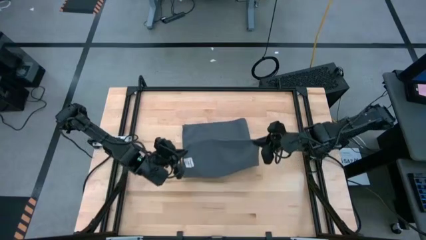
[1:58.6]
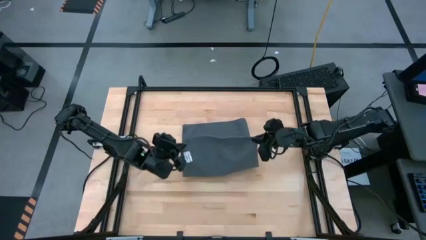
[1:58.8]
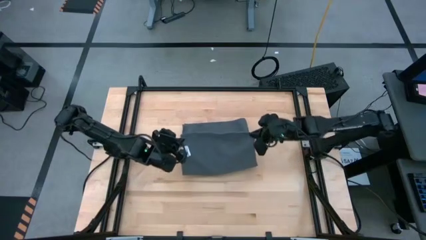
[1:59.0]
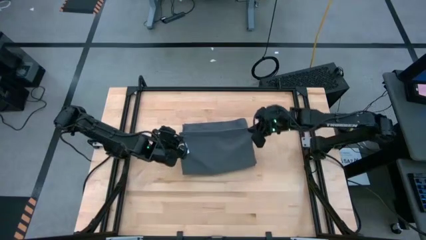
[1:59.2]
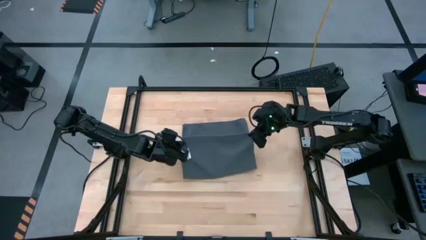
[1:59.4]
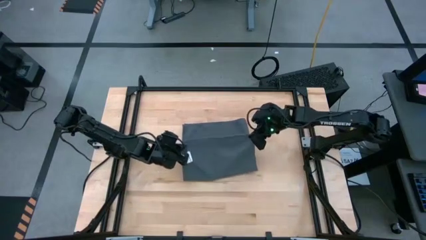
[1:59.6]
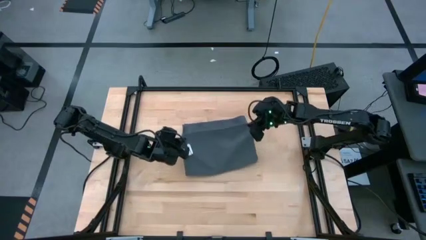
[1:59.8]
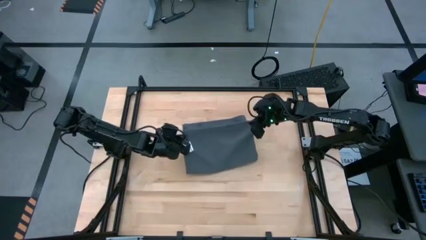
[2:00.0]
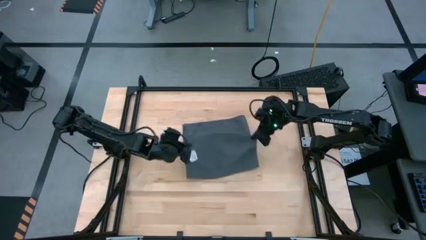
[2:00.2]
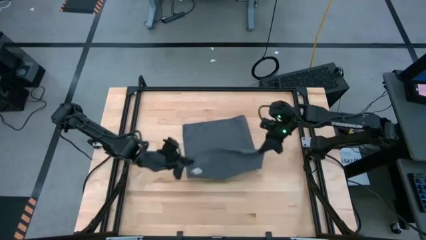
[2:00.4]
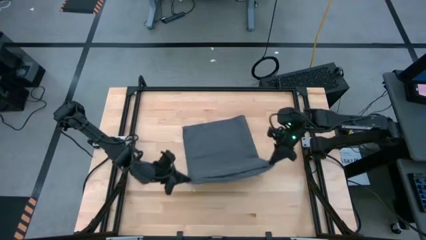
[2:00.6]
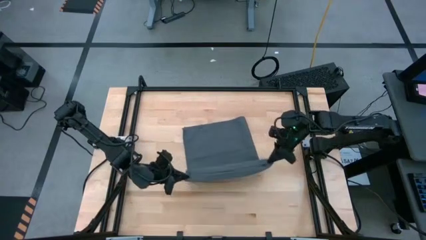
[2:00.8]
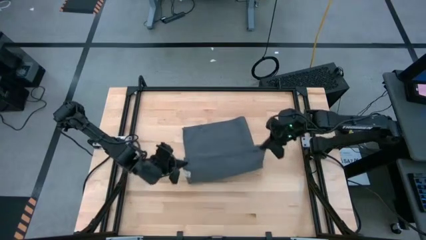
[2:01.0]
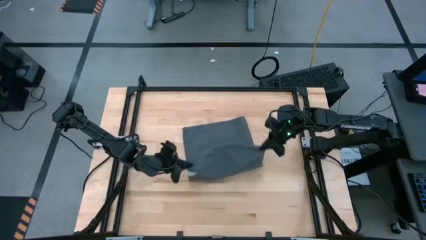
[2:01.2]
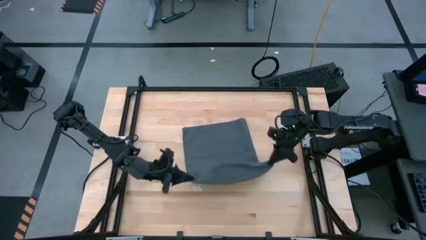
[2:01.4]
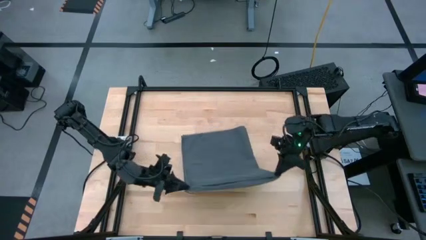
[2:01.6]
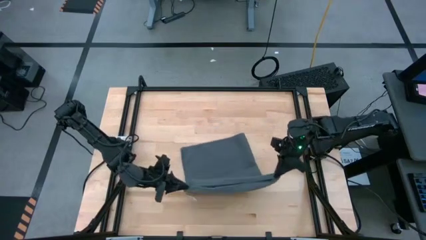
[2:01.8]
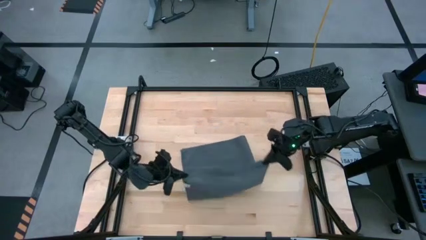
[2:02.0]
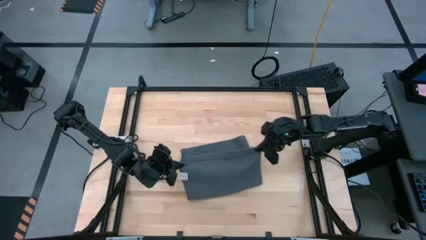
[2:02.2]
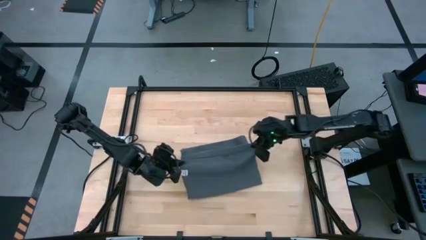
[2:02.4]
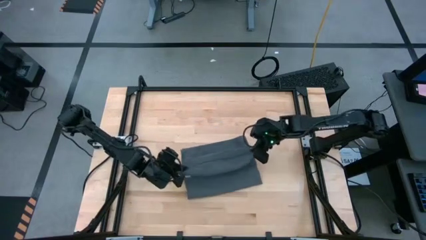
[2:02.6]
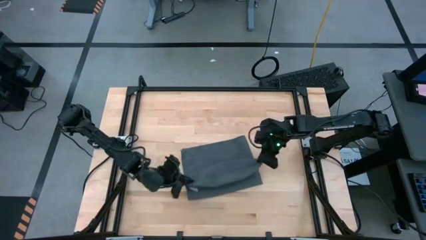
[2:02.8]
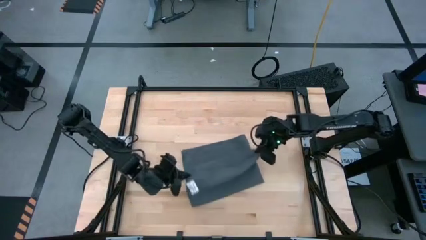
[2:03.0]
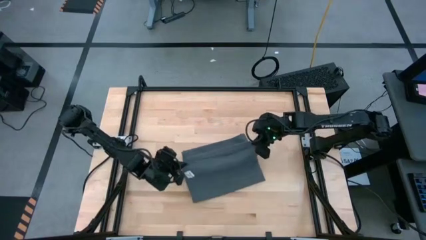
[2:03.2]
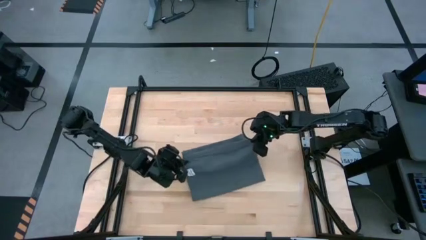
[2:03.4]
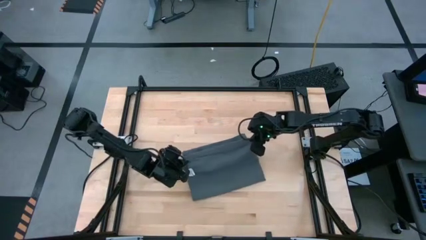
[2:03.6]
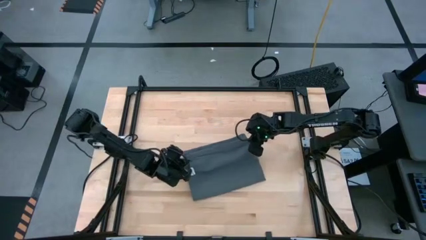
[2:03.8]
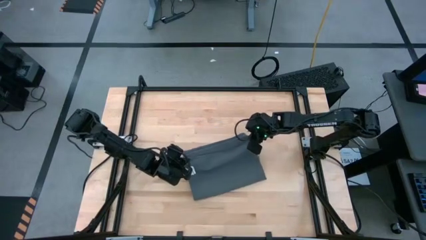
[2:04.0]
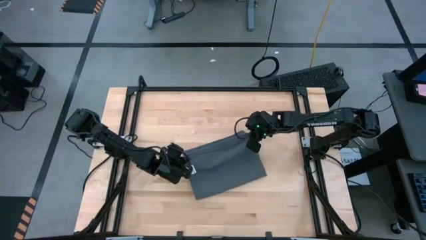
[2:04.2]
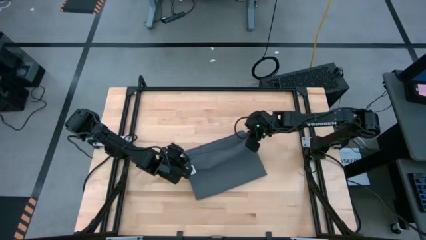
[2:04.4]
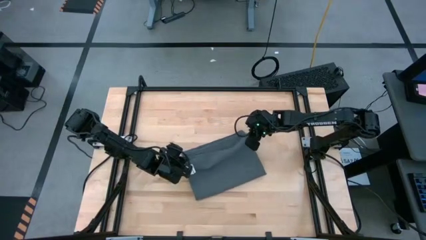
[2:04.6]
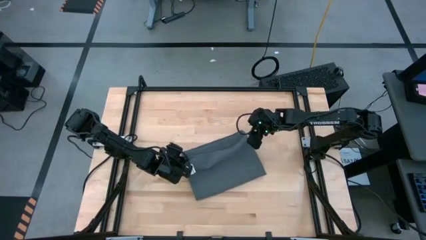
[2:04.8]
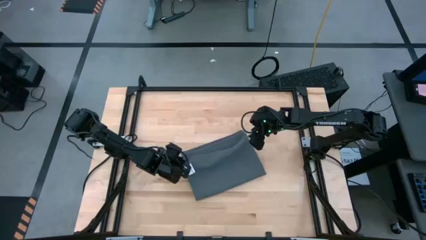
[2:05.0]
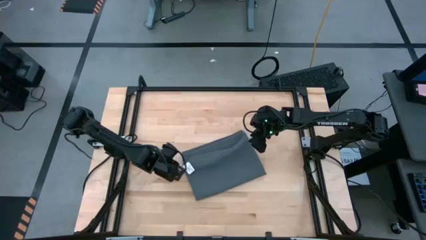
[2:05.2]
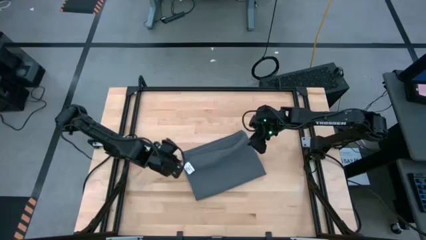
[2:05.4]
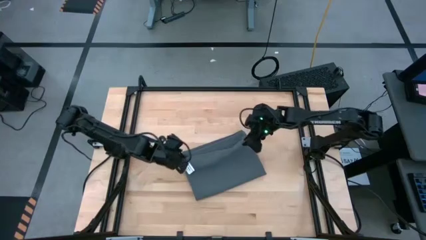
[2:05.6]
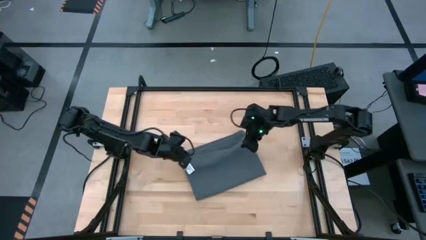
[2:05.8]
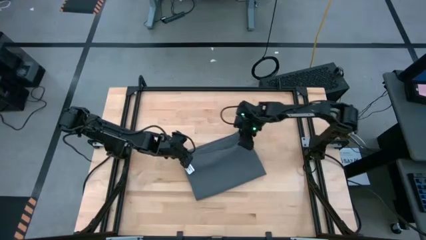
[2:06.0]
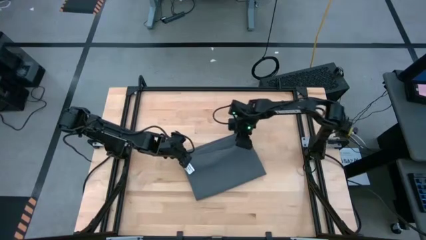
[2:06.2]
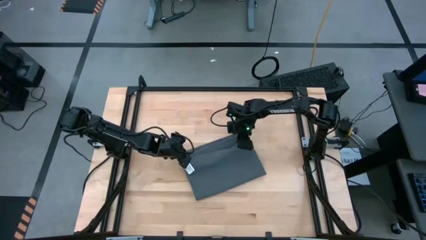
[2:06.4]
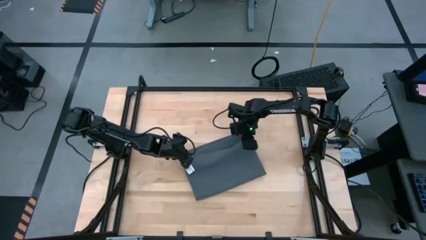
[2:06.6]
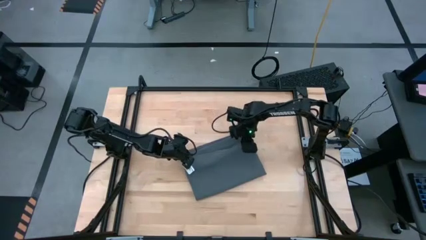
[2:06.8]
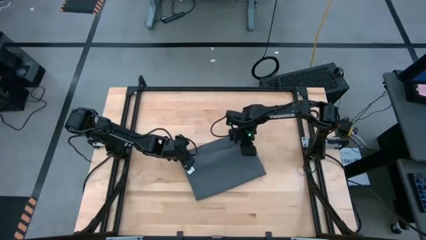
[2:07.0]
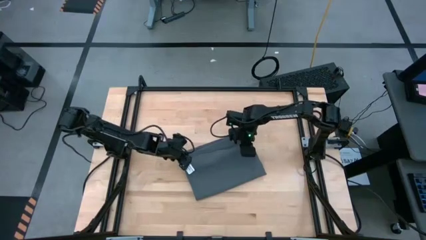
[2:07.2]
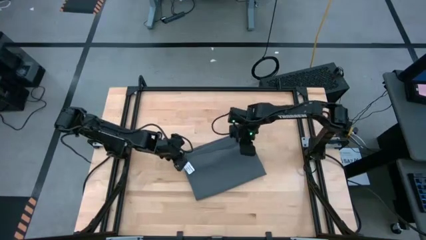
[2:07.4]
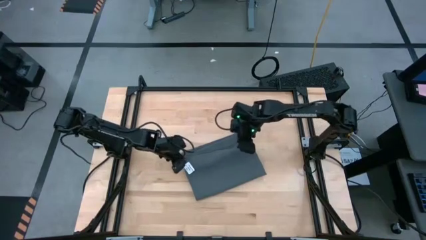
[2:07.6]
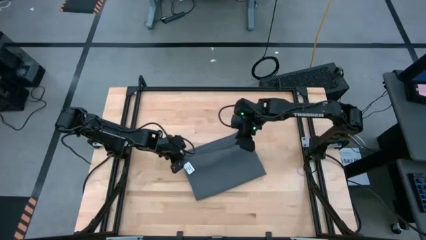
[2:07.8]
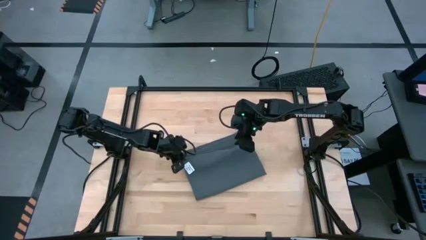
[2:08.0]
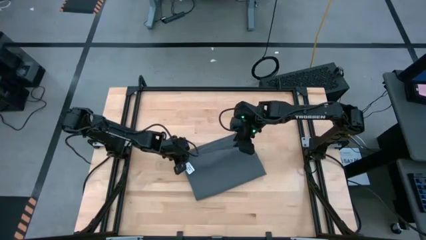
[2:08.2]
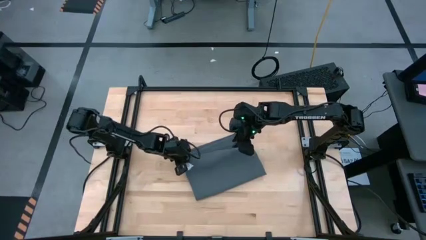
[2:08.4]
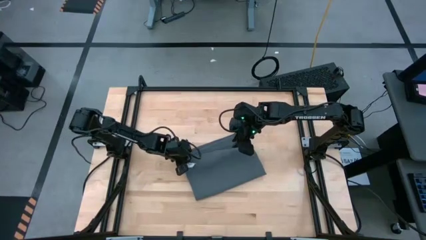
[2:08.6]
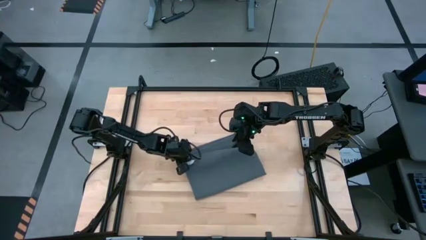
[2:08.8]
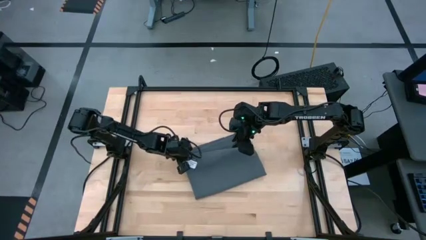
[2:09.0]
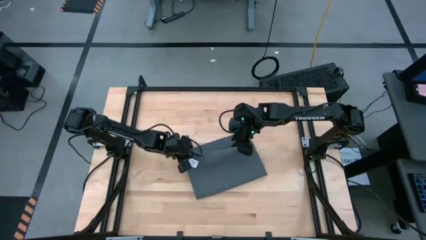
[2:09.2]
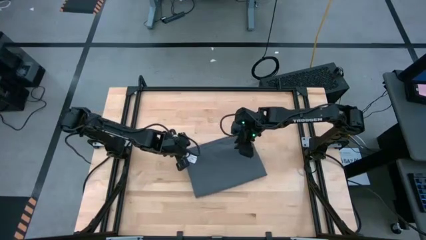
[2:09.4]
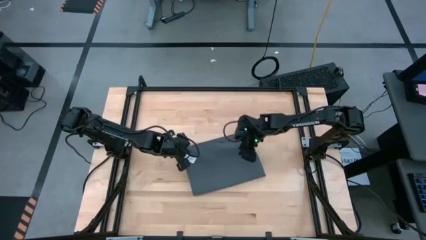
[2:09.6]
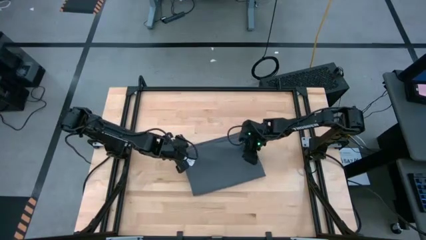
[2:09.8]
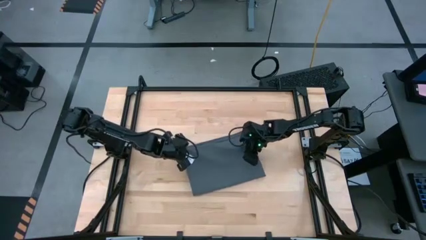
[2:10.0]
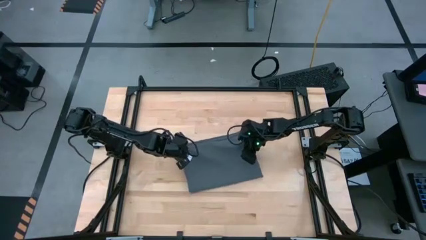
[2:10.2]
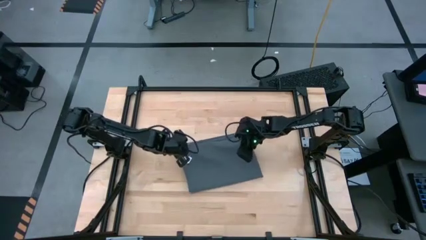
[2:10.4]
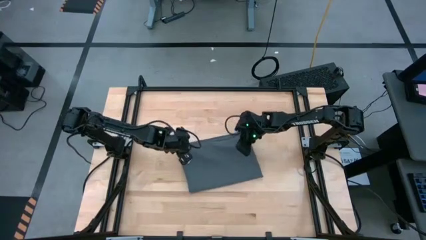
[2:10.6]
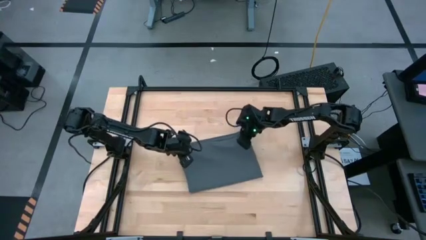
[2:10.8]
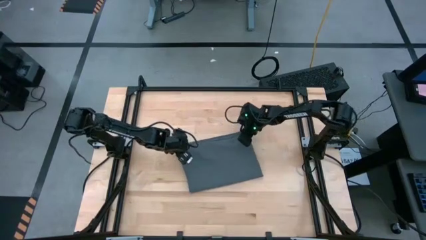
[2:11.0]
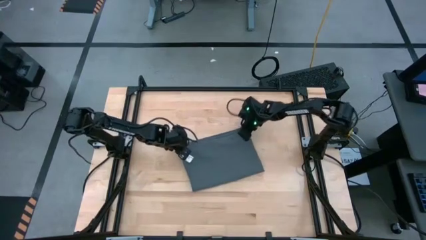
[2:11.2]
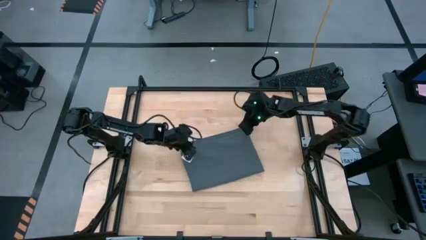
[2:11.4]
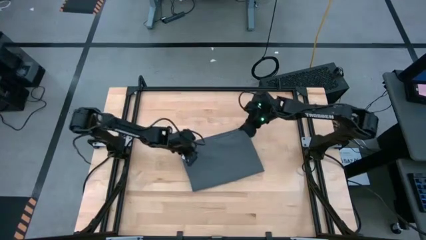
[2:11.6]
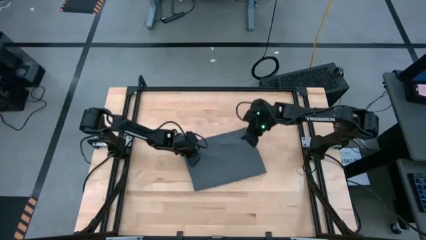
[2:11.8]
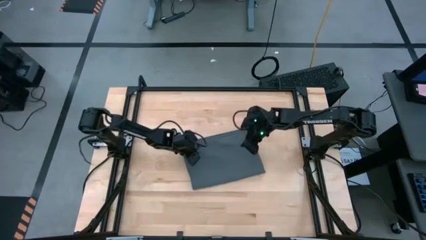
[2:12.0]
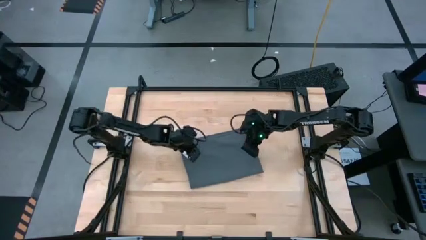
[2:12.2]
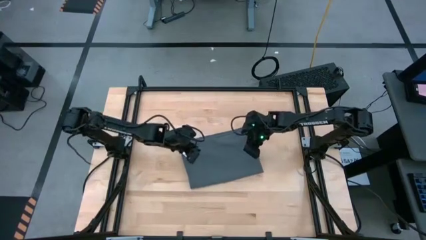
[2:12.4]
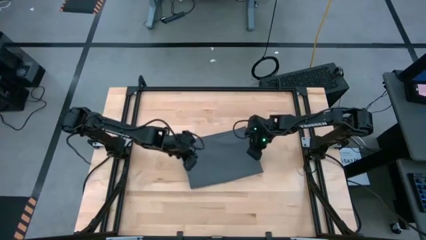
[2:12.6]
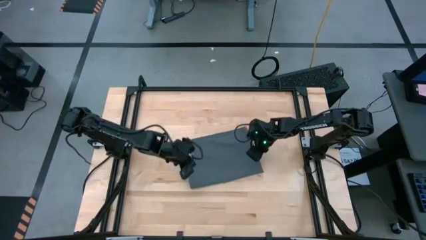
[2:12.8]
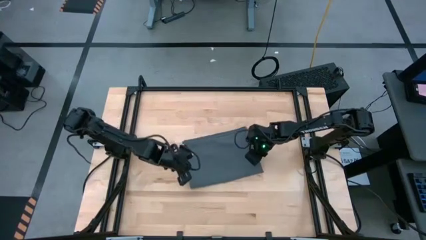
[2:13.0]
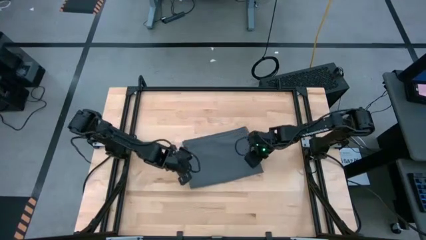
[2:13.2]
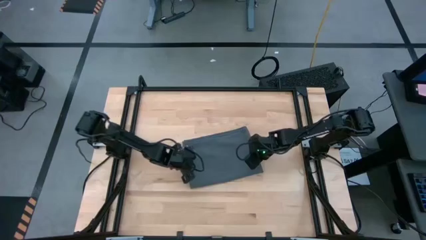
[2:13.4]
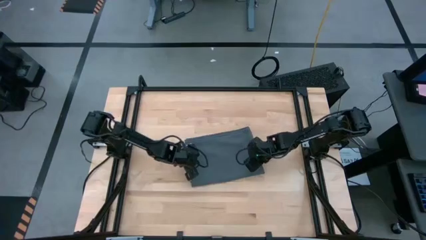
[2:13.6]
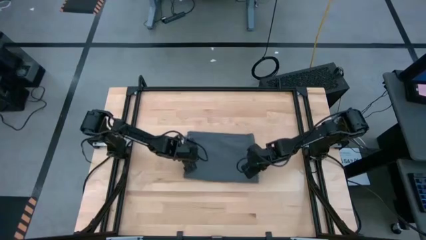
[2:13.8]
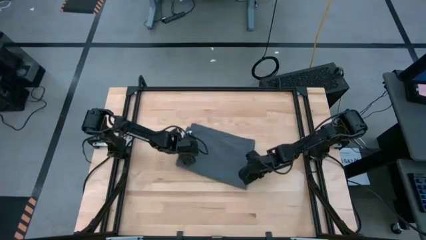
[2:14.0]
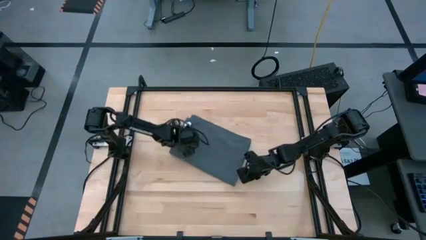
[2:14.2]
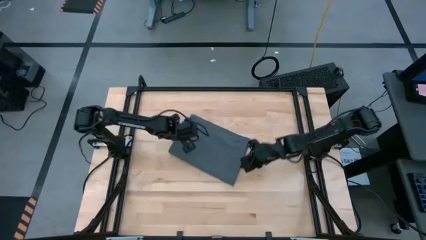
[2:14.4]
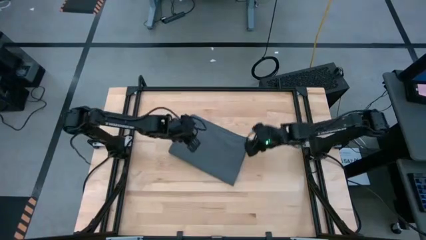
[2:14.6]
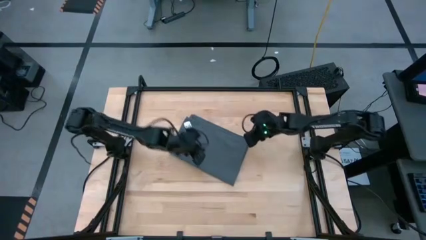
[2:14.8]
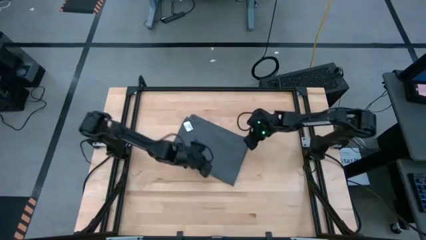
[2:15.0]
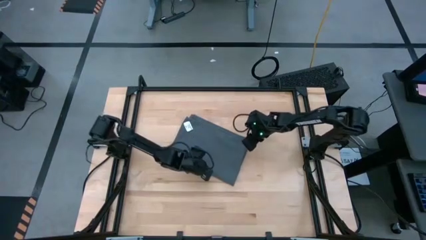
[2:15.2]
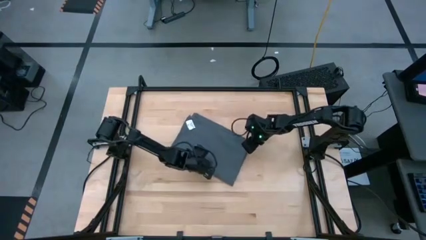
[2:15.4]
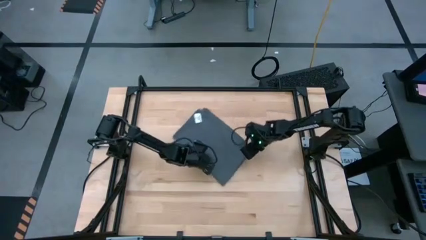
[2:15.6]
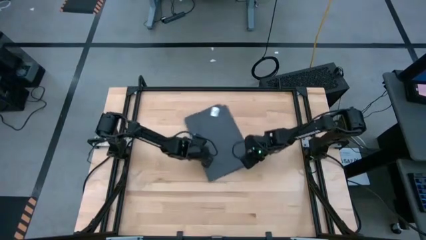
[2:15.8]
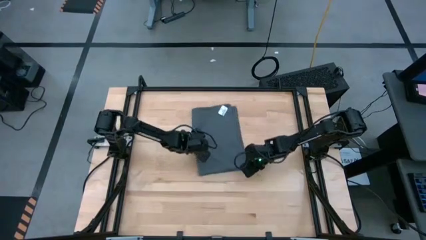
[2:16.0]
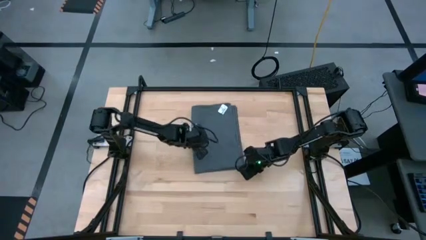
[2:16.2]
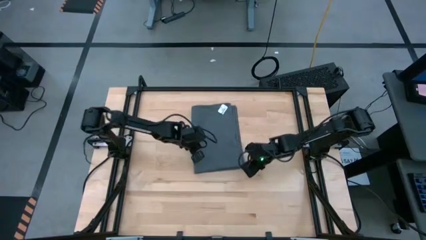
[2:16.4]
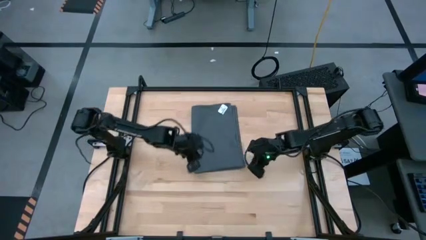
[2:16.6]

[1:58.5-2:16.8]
Task: Roll towel
Fold the gray towel on the center of table
